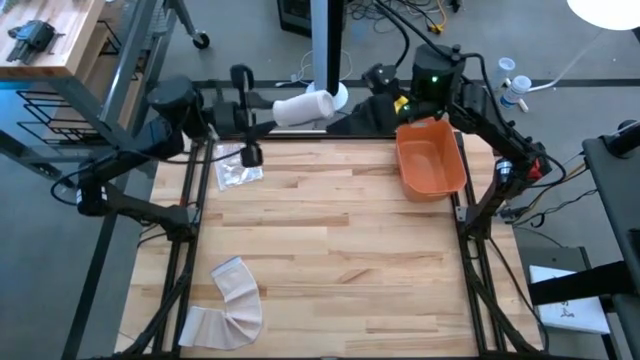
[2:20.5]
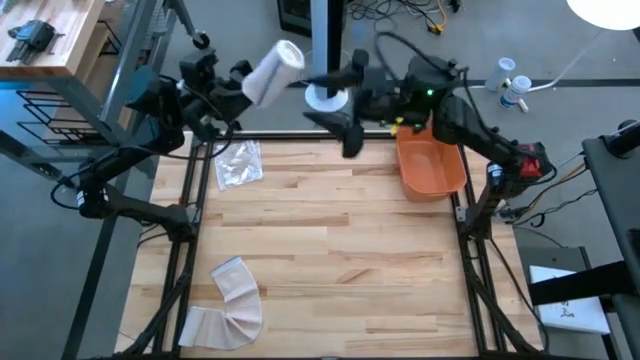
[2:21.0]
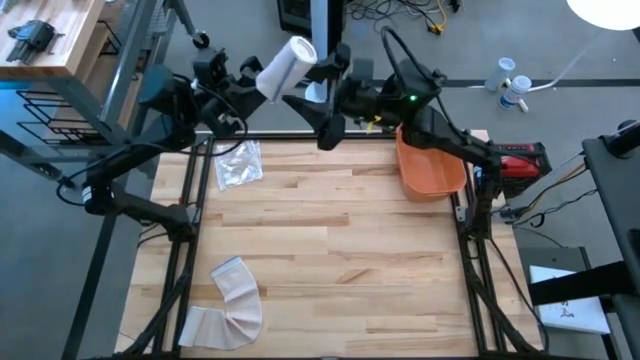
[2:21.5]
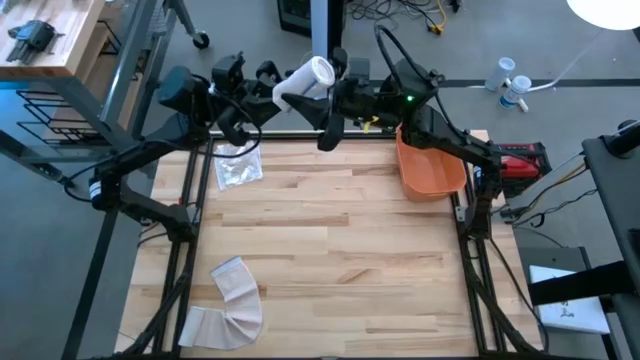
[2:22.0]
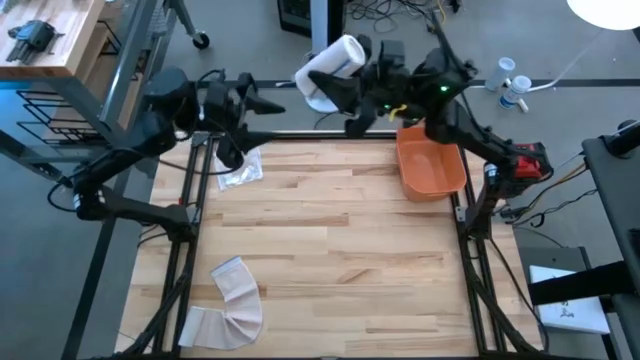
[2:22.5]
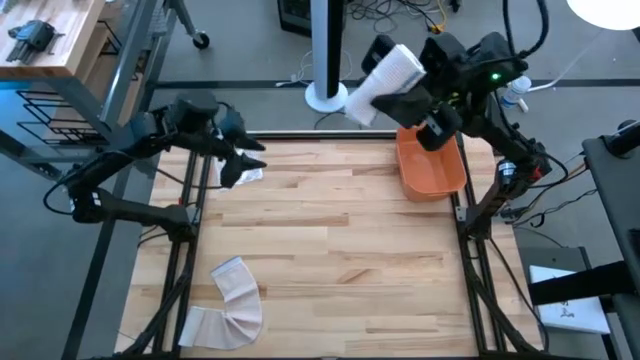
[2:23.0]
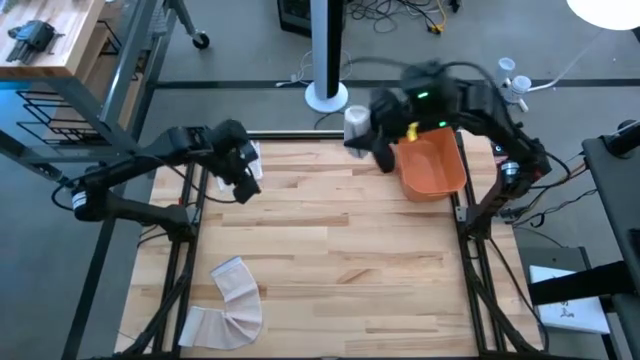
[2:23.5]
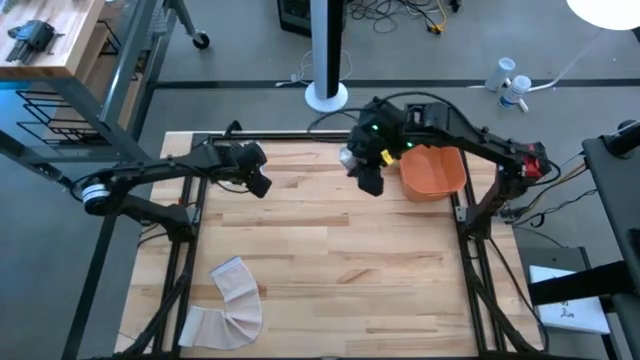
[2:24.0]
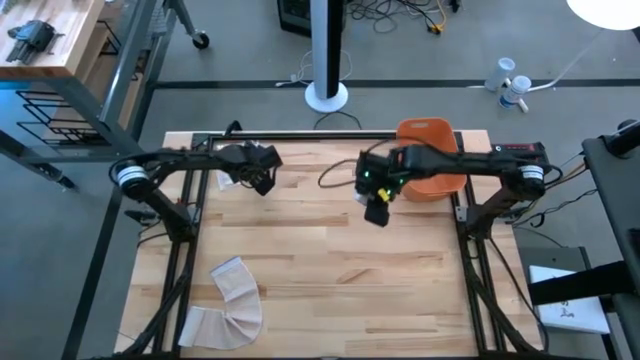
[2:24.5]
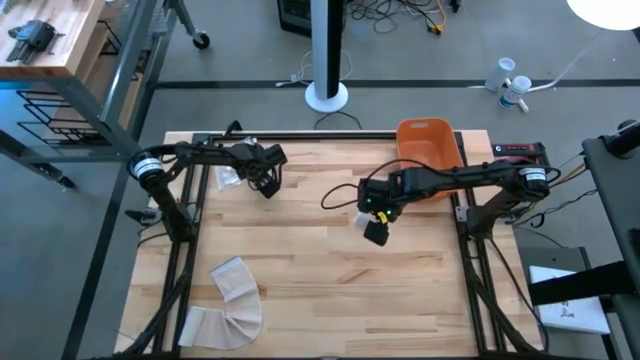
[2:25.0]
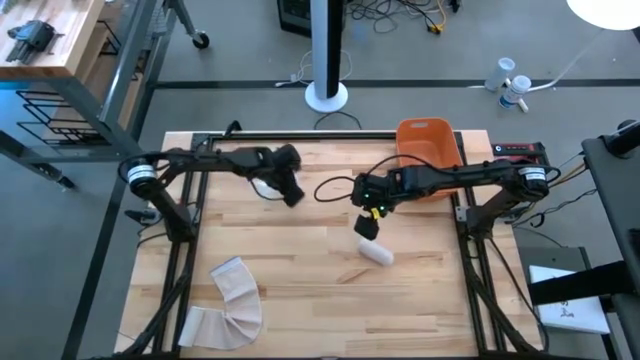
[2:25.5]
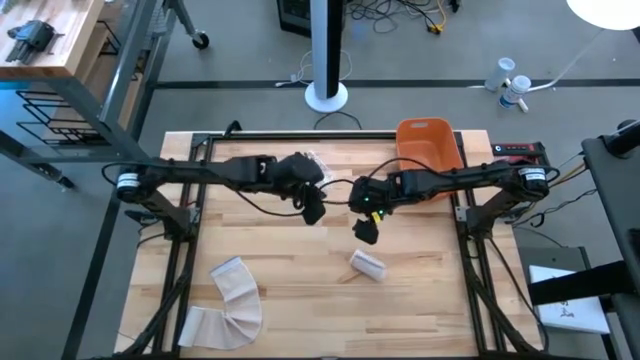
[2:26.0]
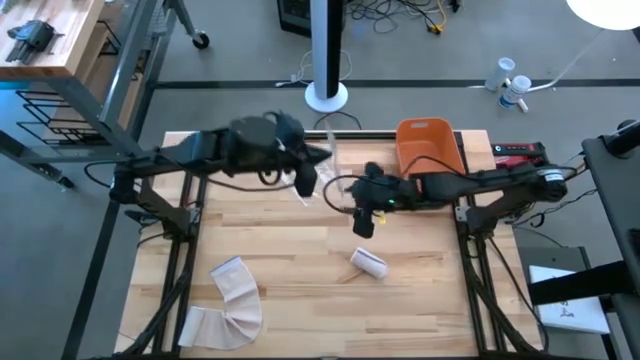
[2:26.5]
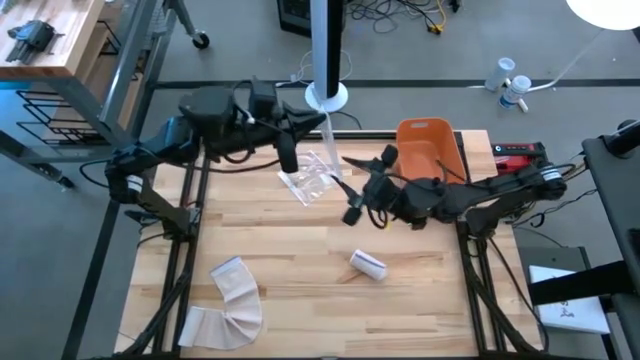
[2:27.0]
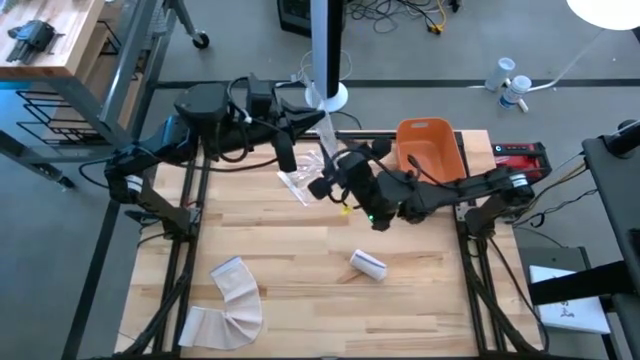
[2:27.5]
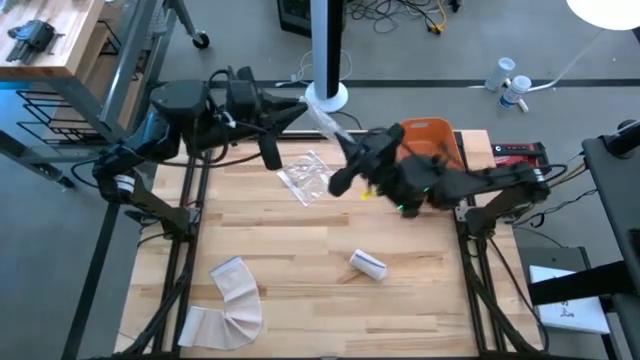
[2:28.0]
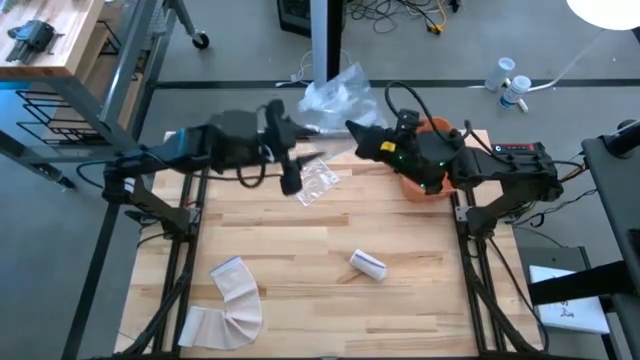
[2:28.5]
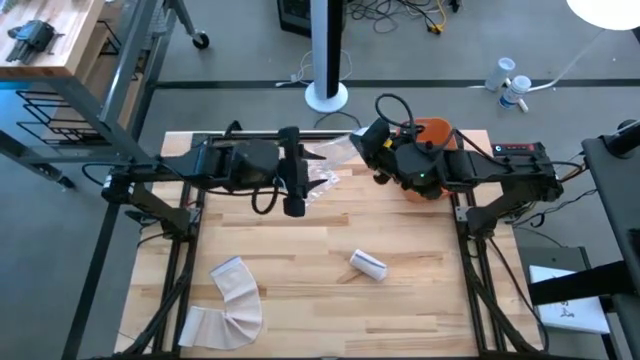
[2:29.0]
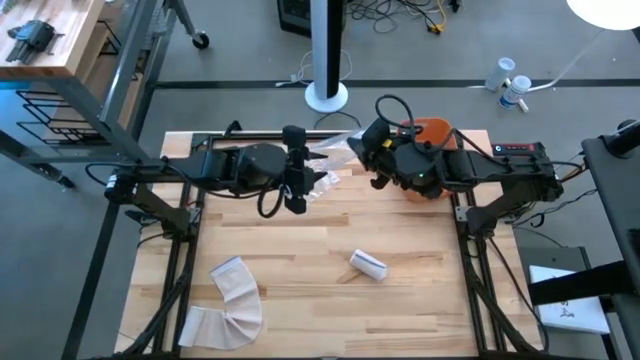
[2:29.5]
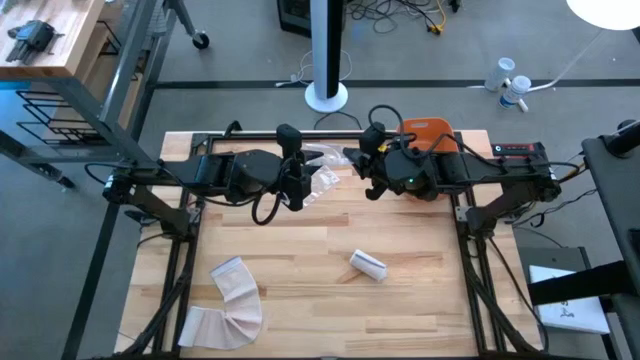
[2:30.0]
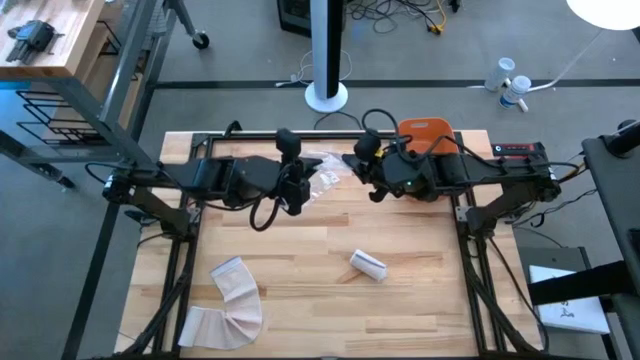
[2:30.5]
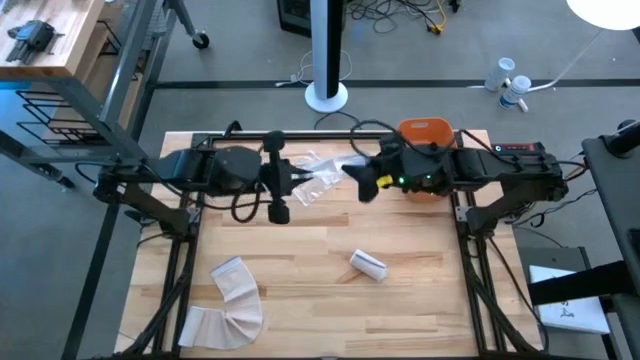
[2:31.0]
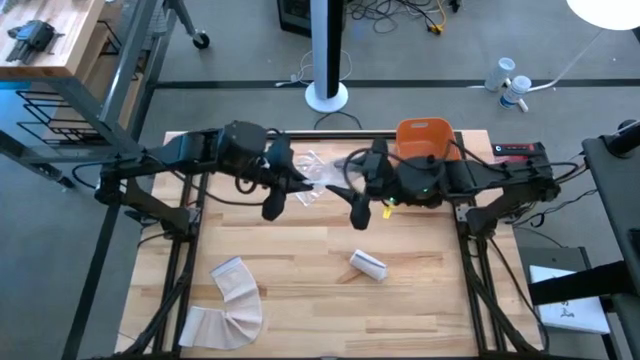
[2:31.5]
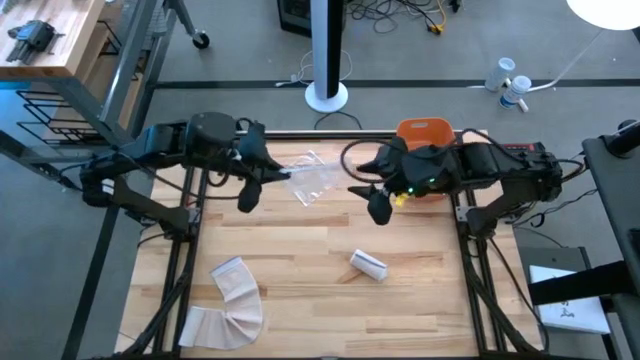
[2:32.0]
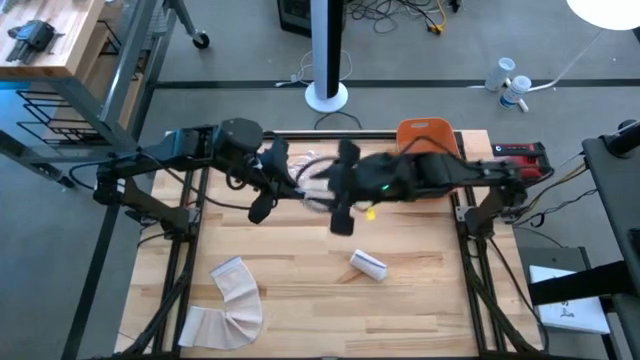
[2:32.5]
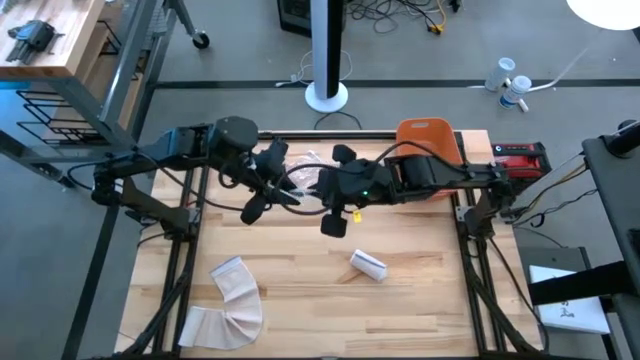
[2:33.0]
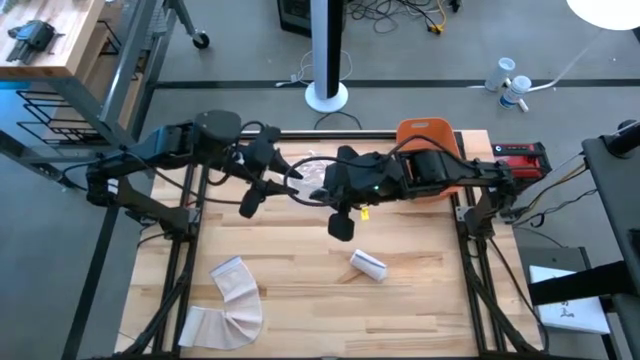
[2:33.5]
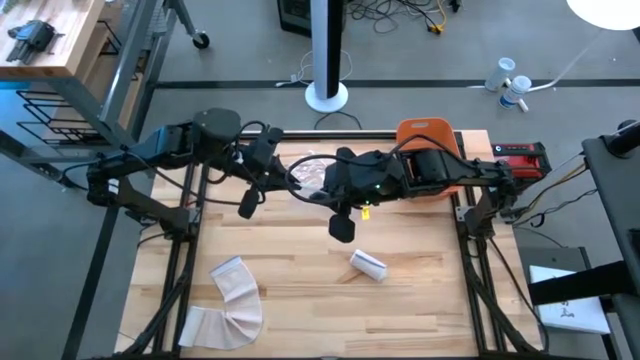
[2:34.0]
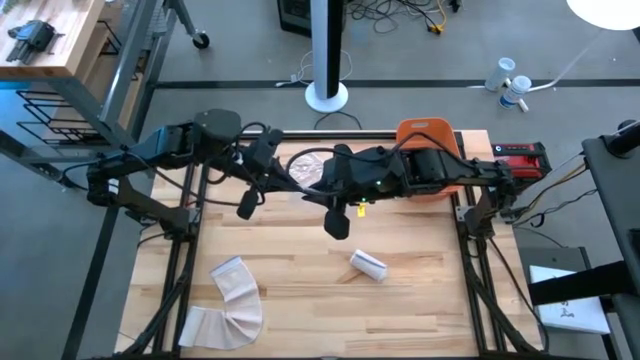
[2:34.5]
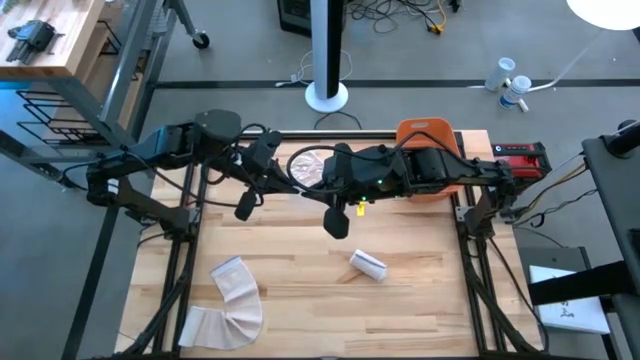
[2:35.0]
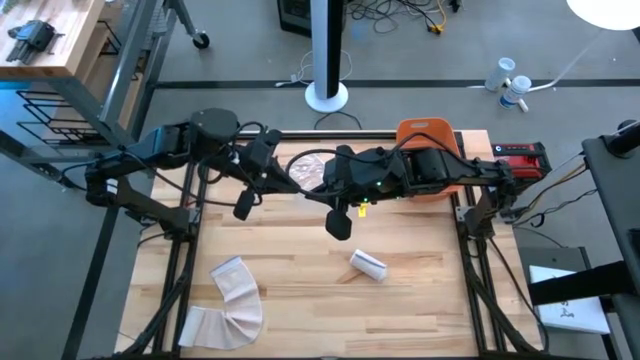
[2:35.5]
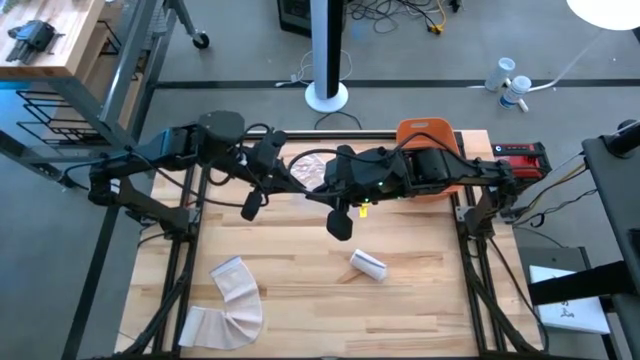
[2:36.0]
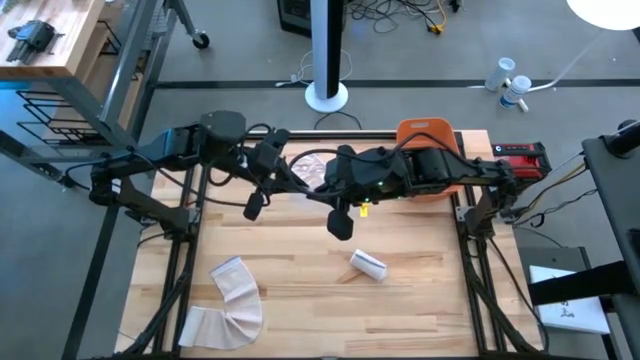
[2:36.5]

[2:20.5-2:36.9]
Task: Roll bandage
Open the transparent zip bag

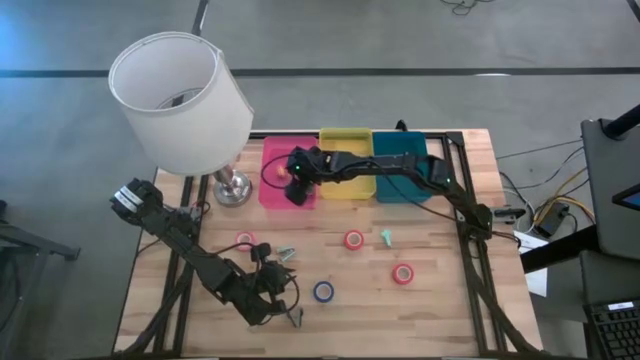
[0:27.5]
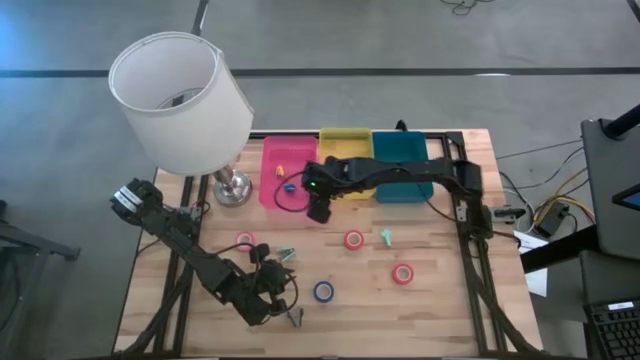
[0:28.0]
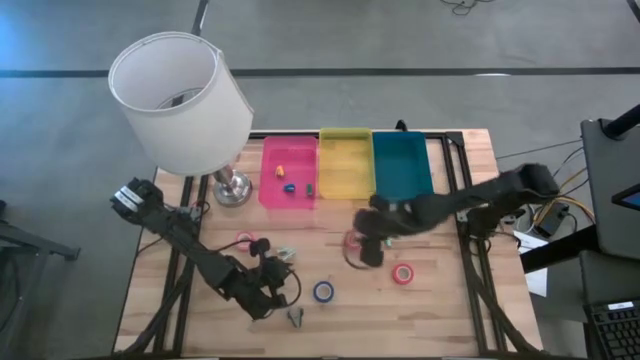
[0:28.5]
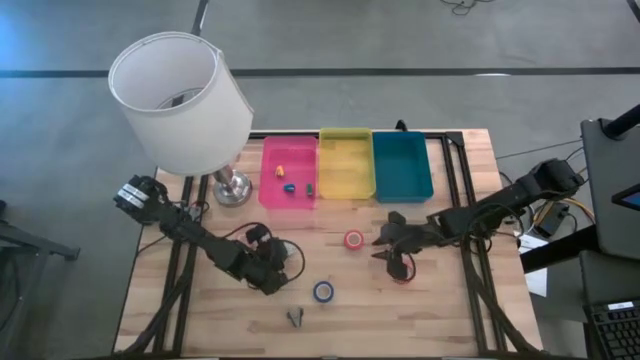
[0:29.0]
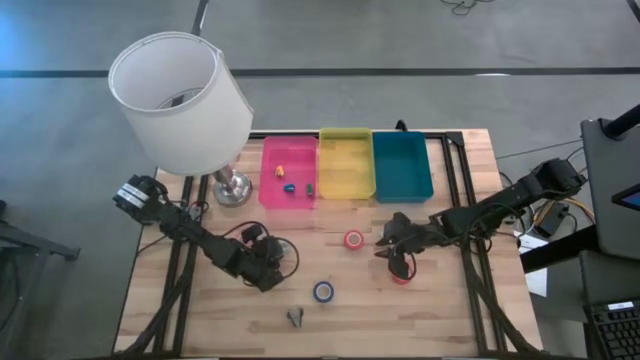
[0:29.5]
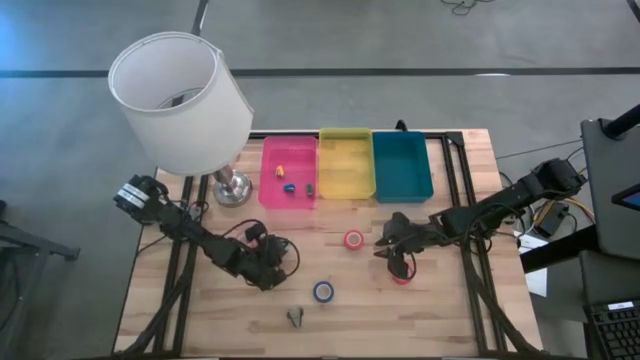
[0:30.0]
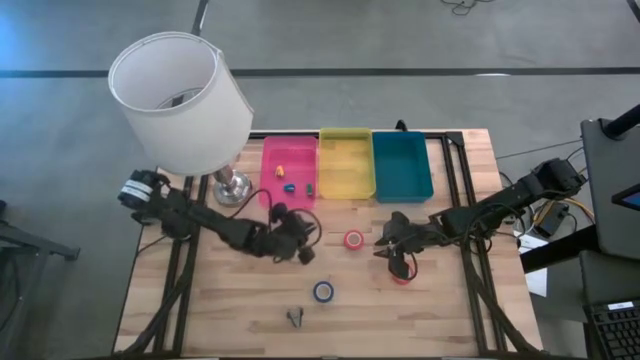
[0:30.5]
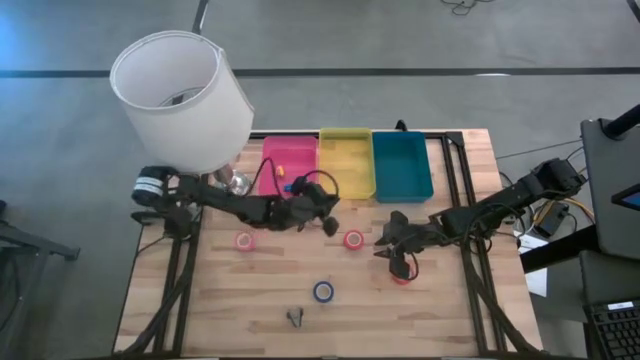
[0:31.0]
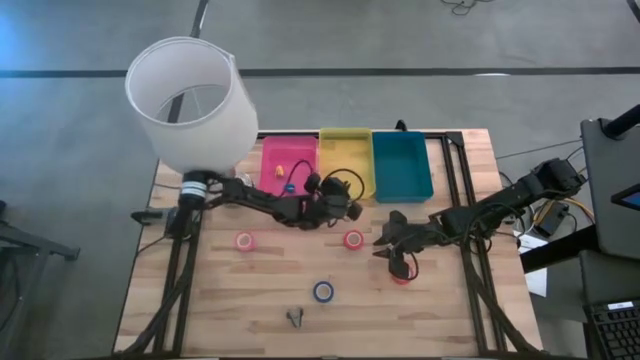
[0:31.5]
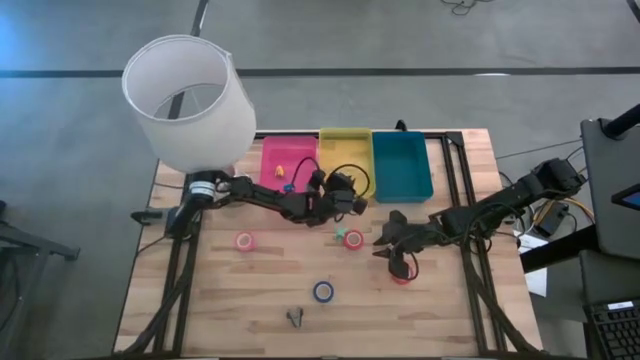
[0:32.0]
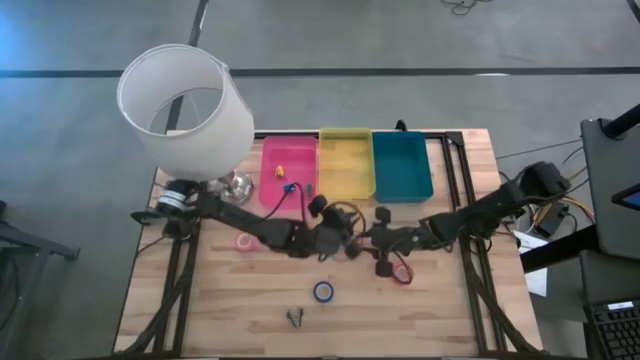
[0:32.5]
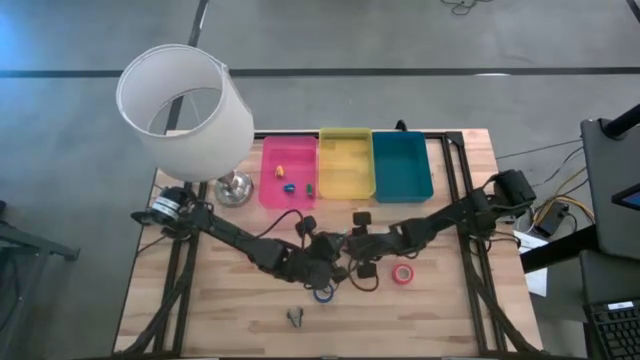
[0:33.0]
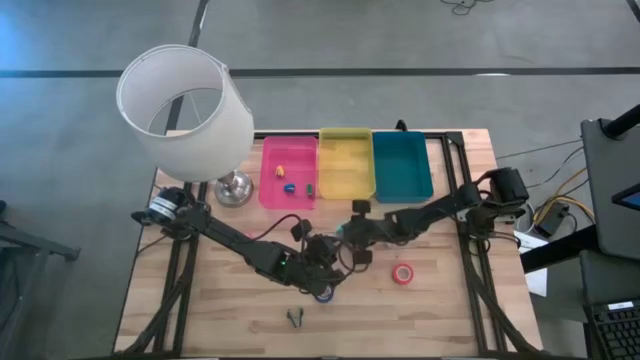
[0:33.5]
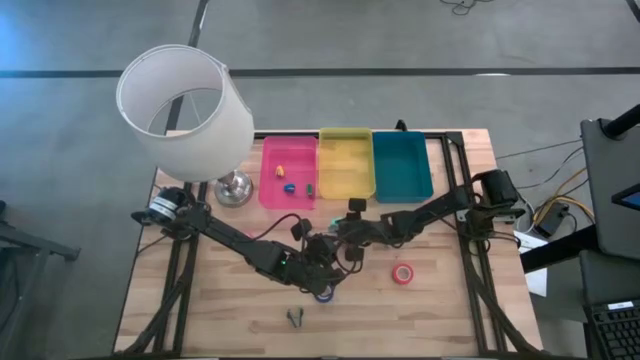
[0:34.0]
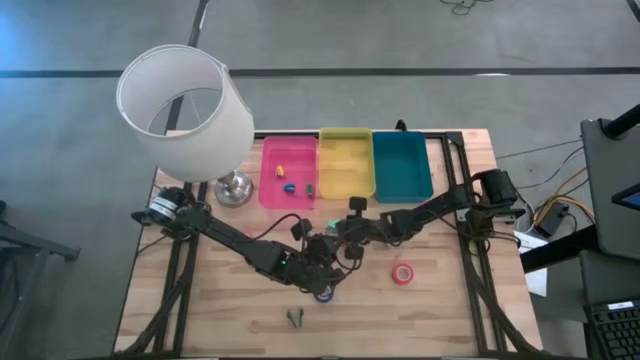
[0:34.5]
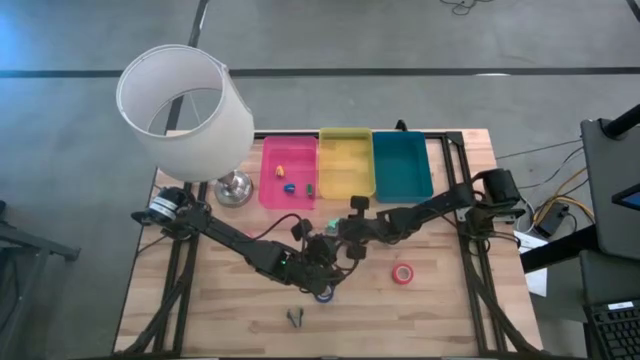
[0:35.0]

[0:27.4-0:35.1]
Task: Pick and place Stapler, Stapler remover, tape
Put the left blue staple remover into the yellow bin
